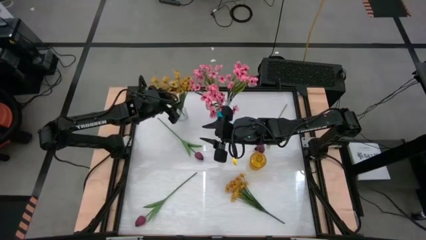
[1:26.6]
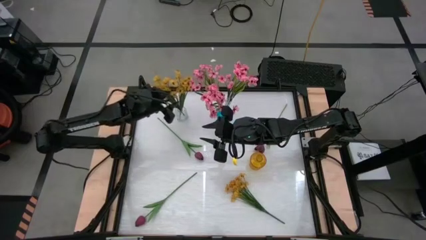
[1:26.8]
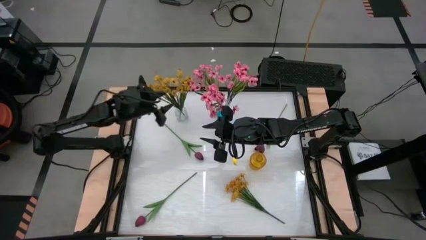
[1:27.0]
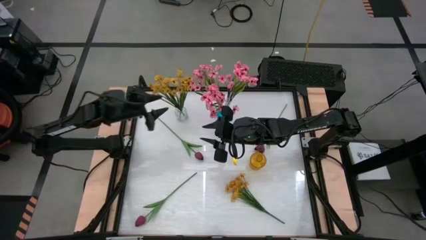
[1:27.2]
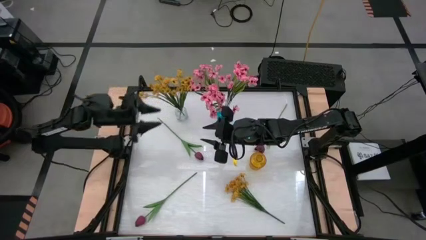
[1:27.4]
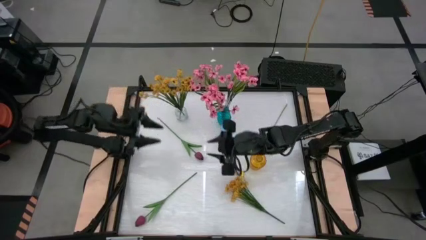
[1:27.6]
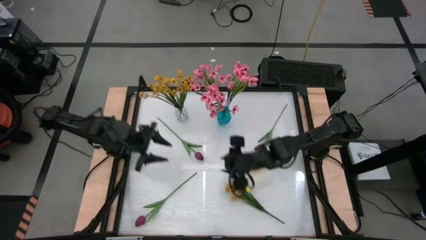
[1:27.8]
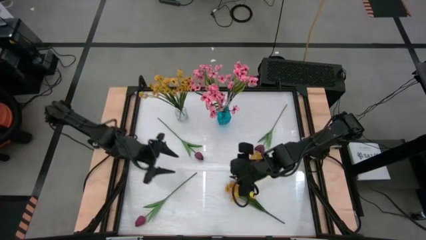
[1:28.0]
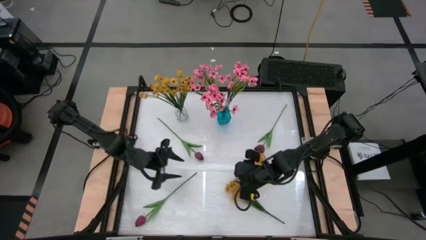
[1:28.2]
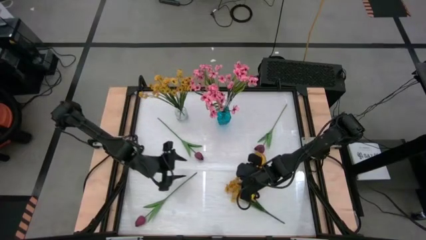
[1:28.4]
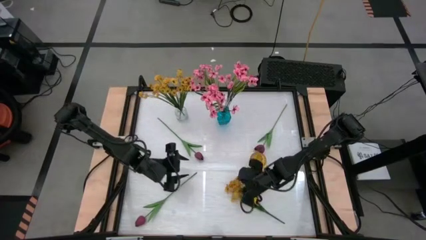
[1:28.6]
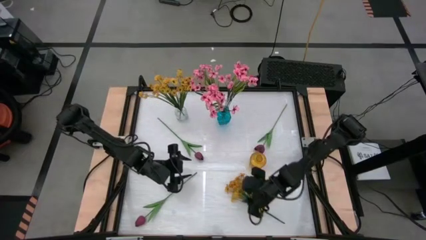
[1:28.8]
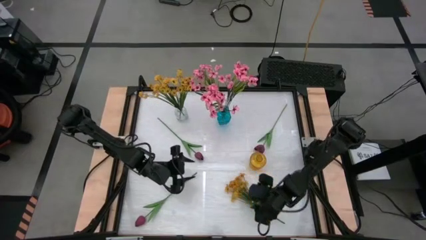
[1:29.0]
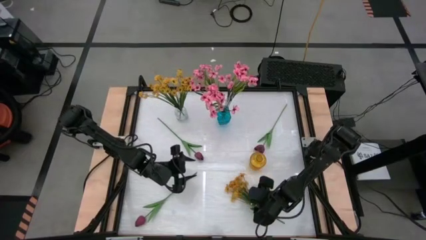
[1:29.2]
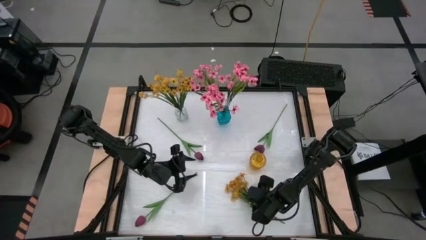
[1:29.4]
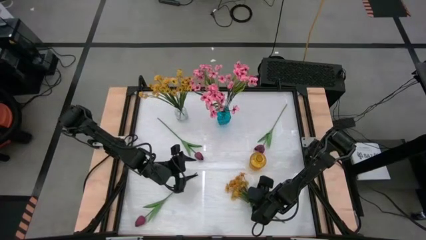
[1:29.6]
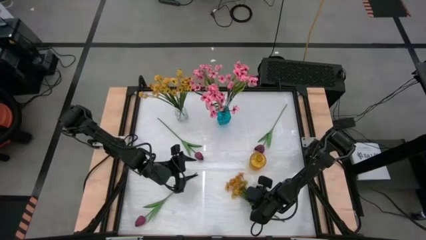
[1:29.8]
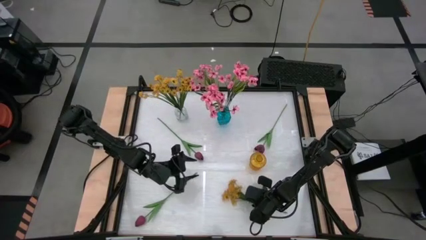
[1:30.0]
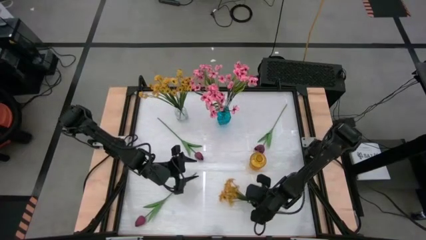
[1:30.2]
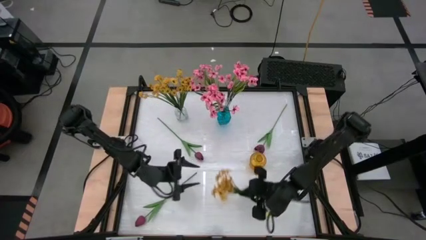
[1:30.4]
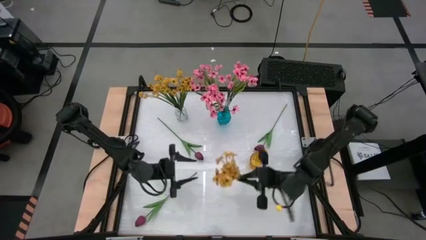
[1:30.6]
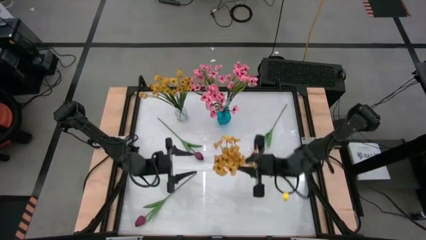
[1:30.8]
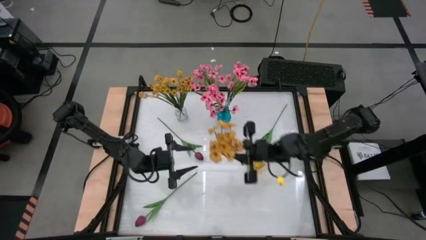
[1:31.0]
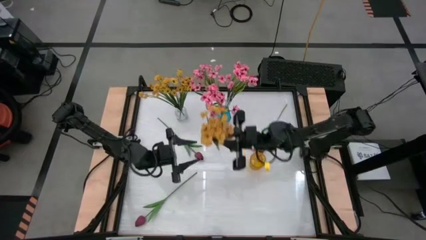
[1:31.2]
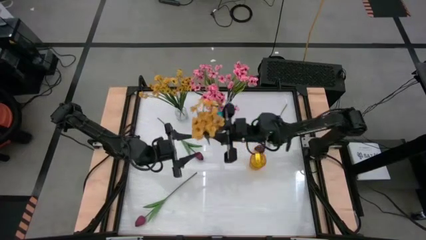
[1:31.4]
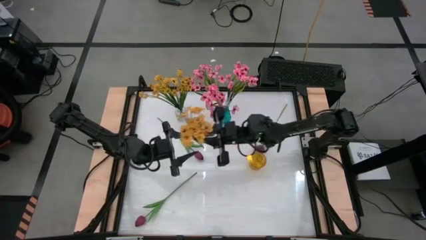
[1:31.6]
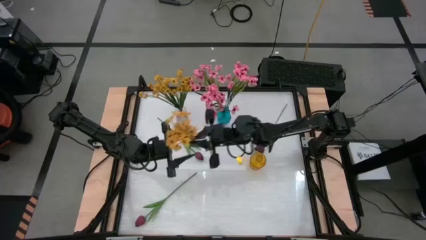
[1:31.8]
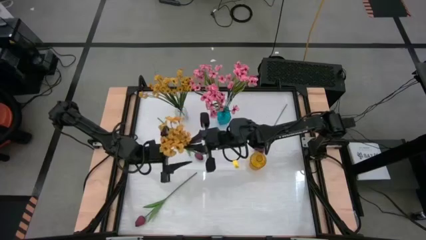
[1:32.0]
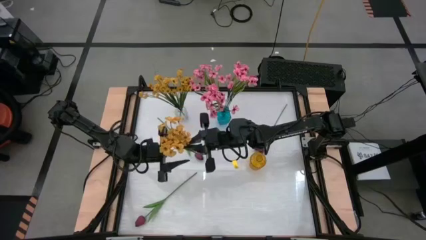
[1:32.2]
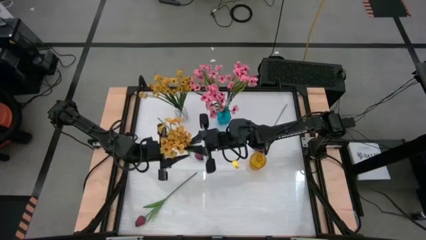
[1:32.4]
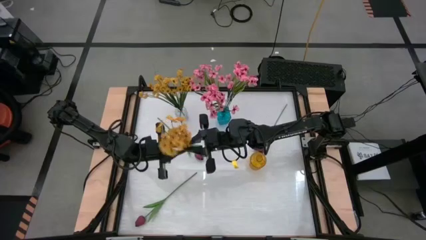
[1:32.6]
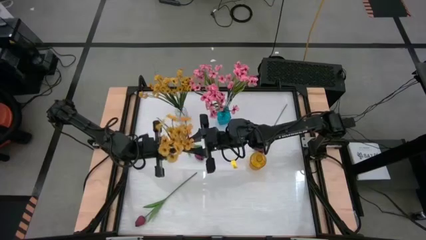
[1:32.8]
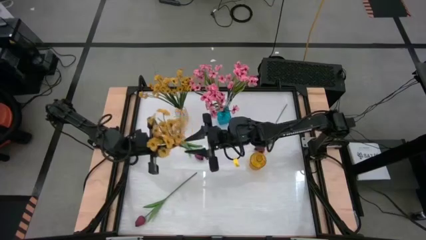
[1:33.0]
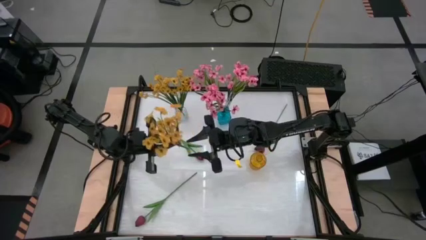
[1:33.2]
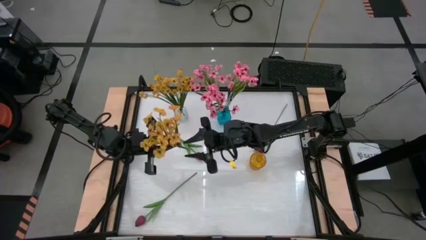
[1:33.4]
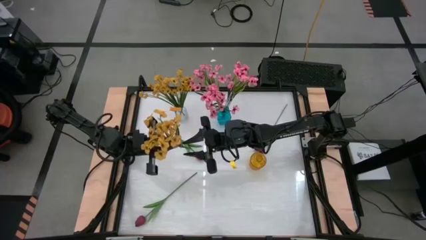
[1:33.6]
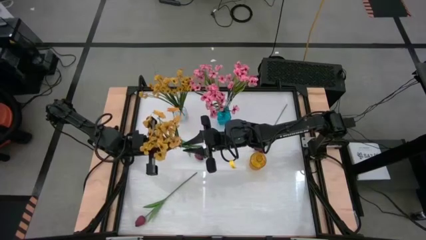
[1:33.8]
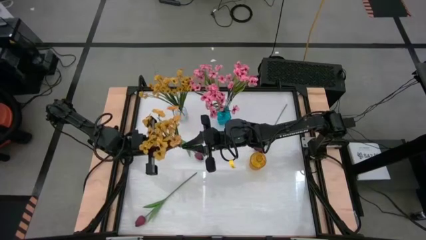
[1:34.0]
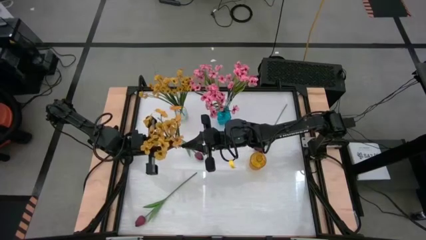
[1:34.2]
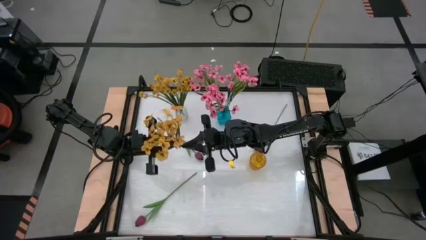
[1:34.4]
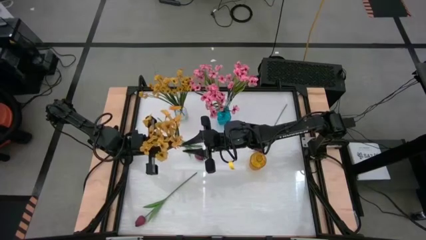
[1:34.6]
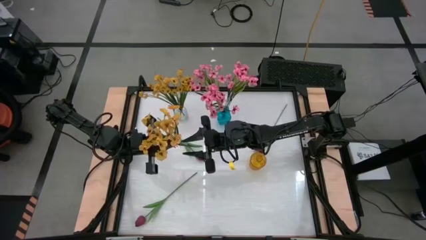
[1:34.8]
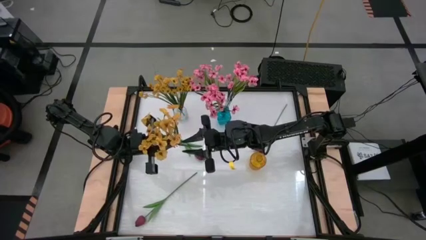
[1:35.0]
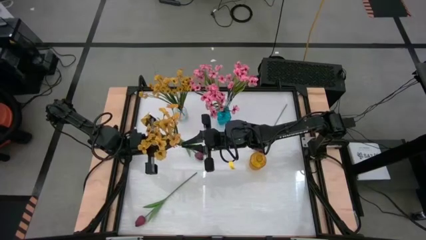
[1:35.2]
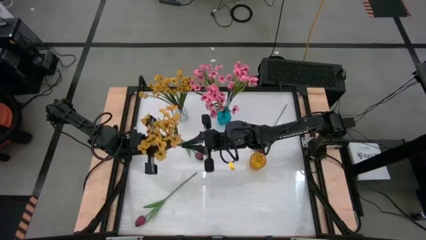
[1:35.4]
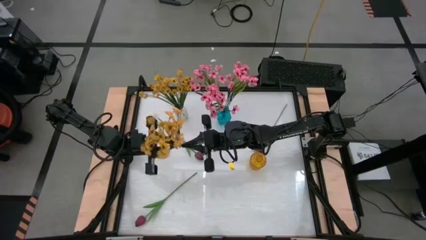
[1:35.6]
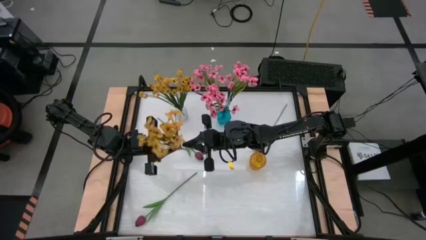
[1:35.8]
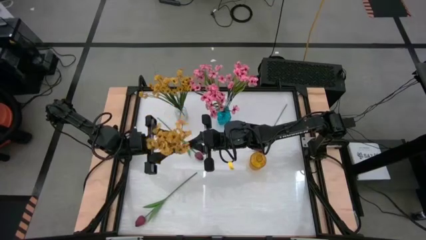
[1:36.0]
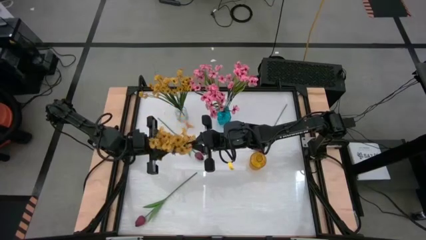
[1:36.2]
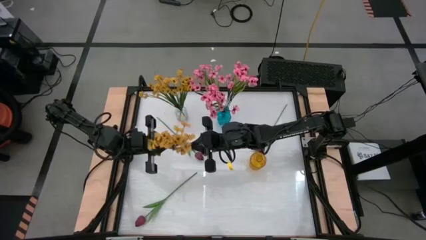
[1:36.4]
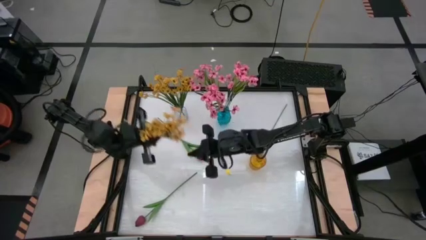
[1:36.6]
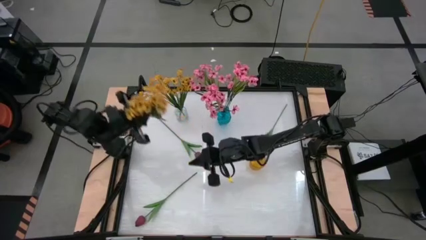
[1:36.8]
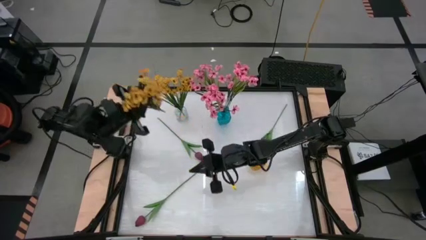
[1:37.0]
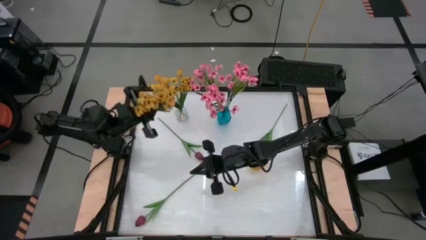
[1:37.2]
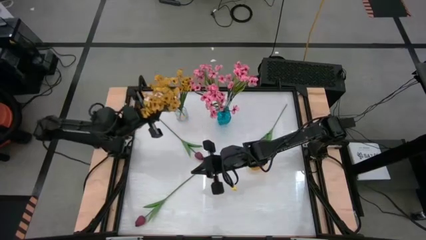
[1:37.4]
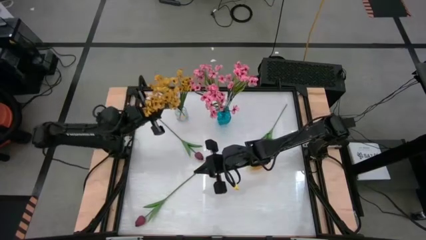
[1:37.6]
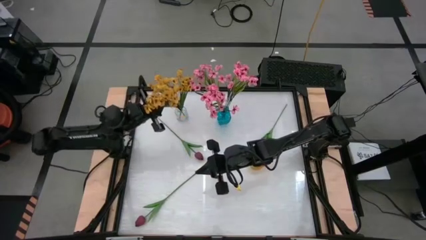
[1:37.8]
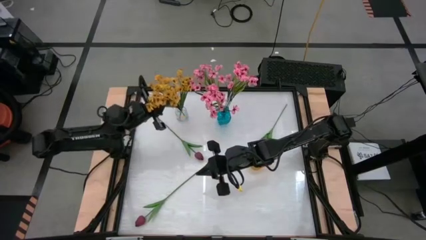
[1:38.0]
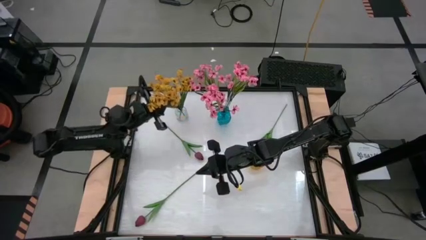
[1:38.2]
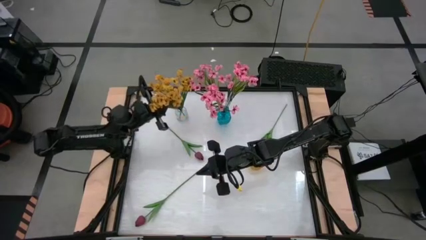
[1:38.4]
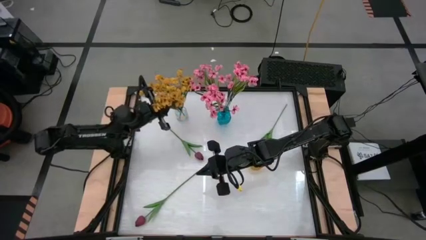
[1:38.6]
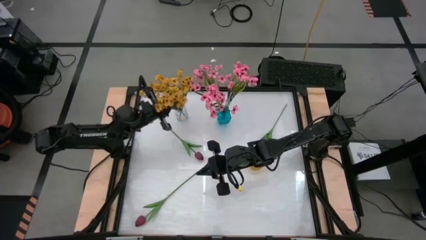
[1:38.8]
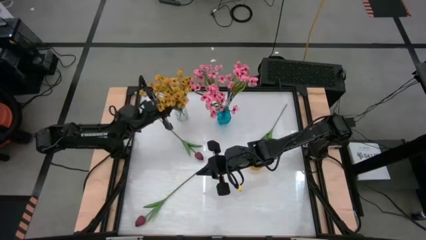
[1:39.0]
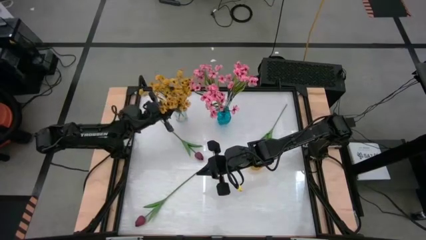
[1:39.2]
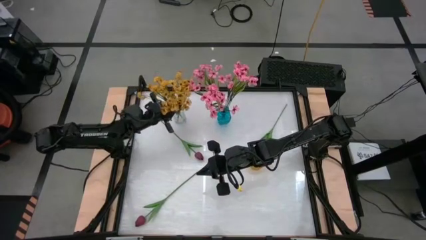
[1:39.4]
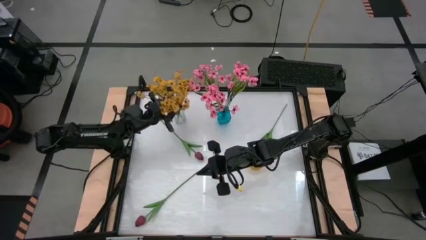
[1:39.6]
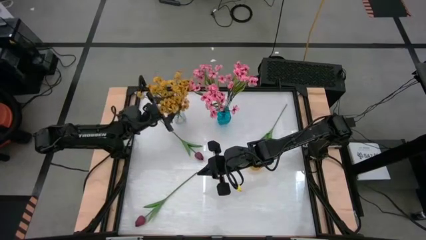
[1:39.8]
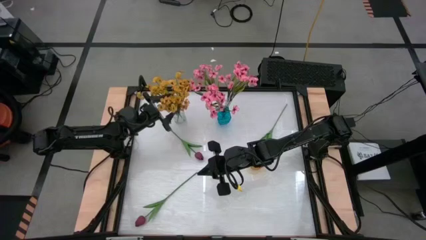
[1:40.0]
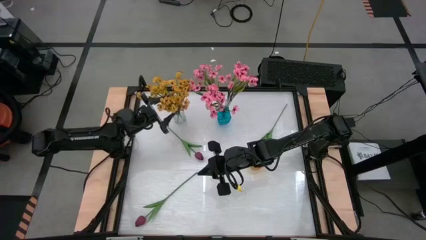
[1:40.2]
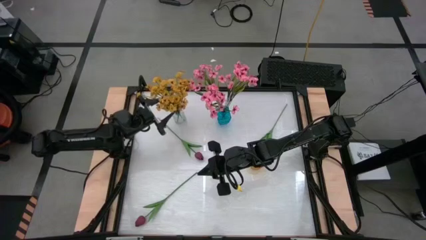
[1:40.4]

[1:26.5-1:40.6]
Task: Sort flowers into vase by color
Put the yellow flowers into the transparent vase
